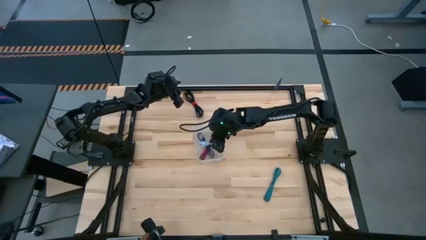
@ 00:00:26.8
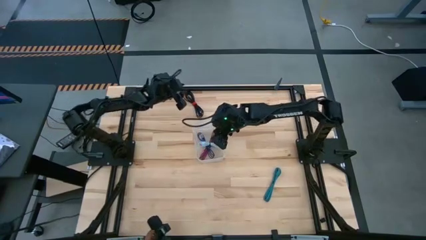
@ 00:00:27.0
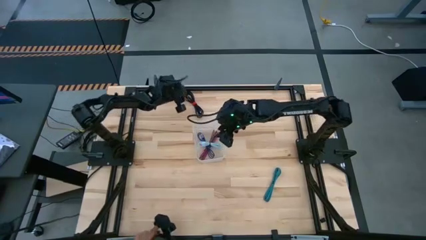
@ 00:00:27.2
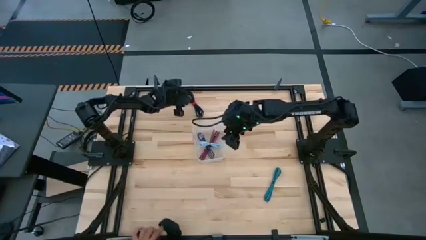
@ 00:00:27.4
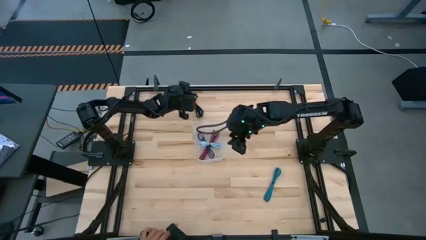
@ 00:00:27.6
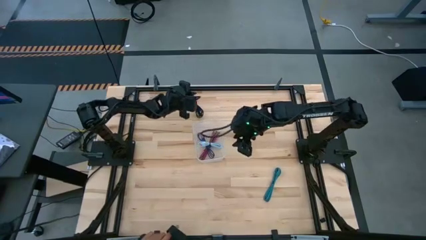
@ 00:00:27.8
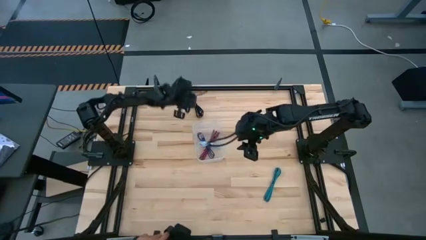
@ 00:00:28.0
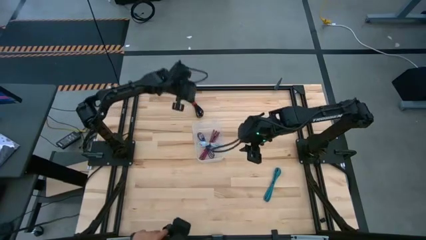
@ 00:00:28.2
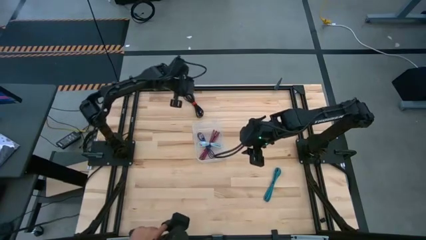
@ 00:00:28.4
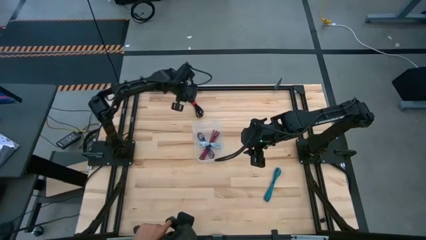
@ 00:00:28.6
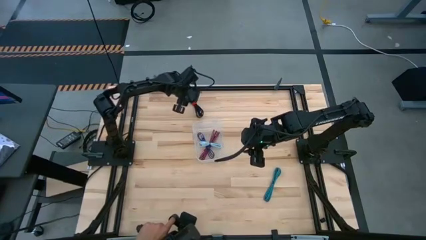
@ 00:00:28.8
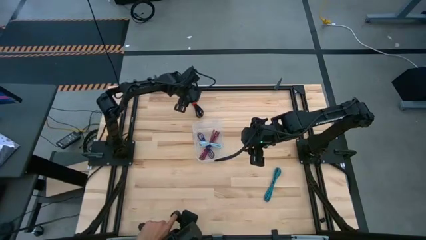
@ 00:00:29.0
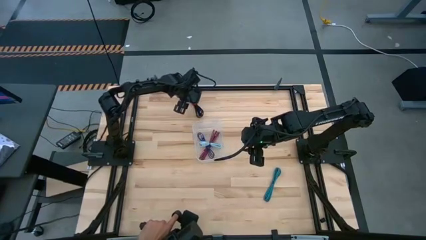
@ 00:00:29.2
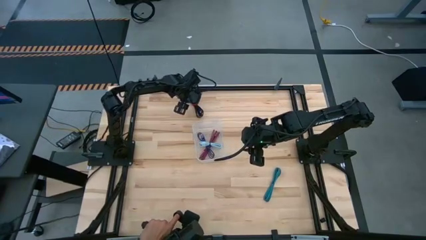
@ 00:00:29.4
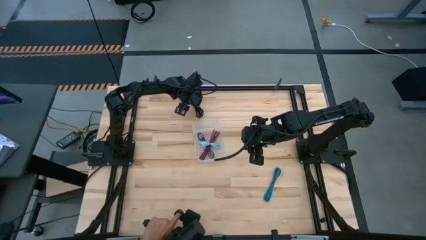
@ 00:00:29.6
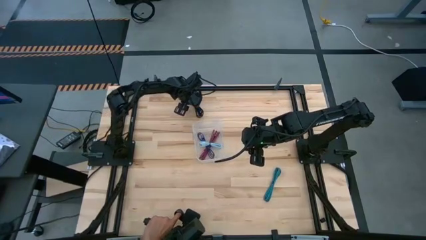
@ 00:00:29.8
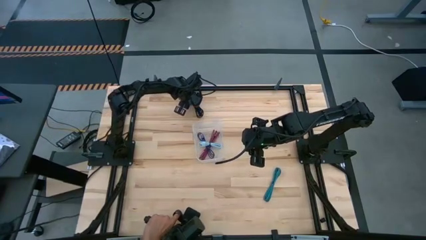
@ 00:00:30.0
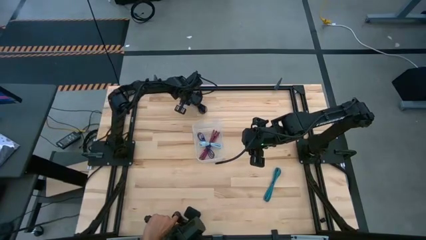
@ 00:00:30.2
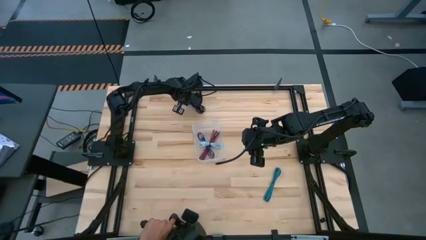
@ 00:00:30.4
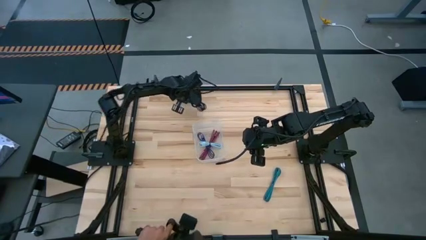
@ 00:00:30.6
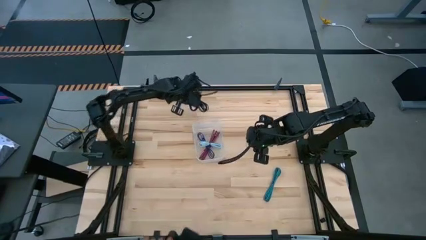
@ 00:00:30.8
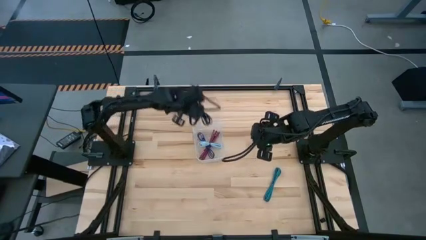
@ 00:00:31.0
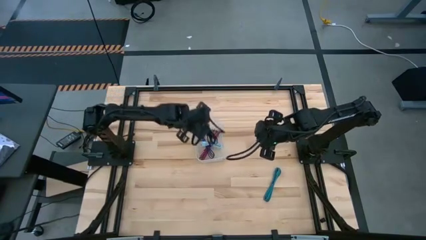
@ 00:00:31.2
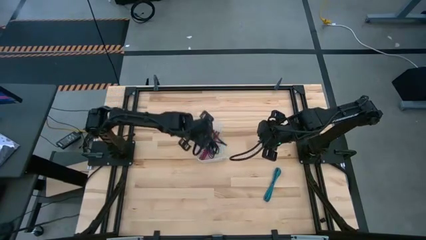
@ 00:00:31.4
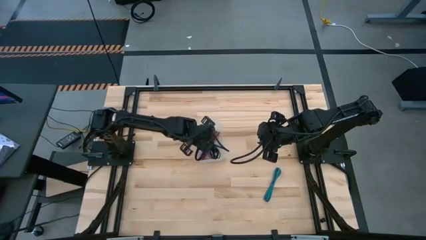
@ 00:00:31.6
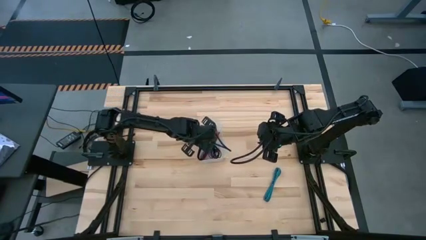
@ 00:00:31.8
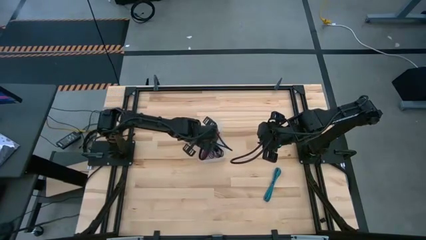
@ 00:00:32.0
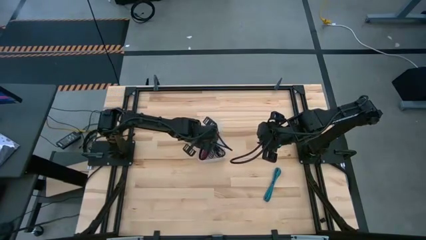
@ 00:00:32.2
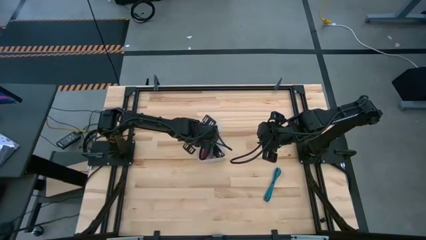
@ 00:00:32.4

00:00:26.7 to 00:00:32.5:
Task: Pick and place USB-C Cables
Put the black charger cable into the white bin

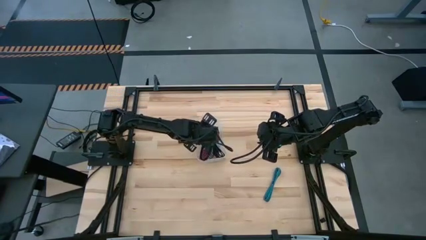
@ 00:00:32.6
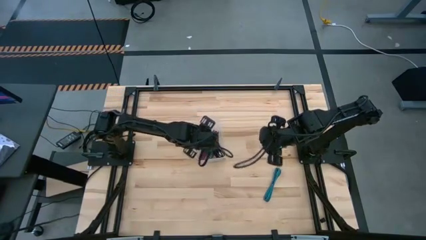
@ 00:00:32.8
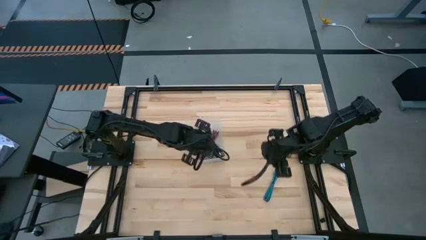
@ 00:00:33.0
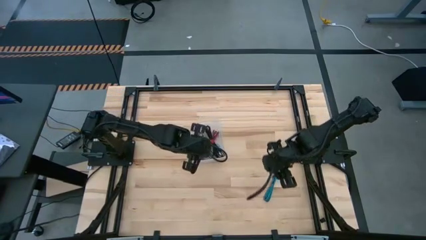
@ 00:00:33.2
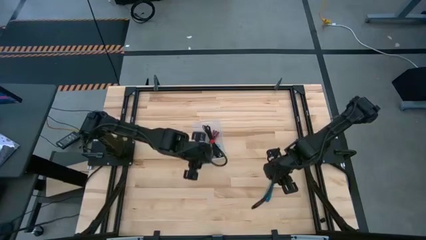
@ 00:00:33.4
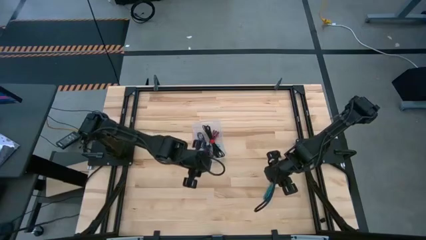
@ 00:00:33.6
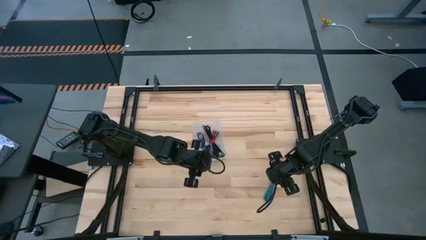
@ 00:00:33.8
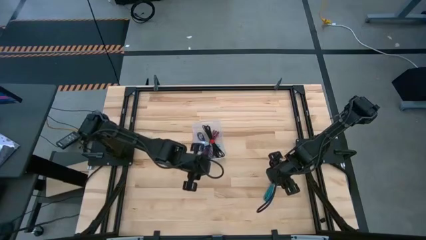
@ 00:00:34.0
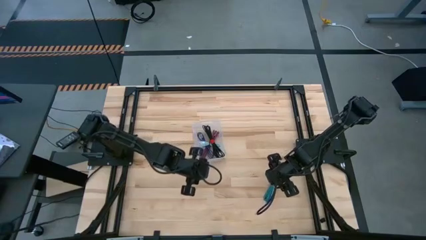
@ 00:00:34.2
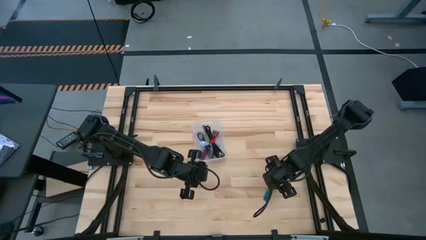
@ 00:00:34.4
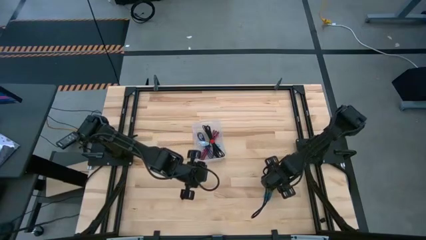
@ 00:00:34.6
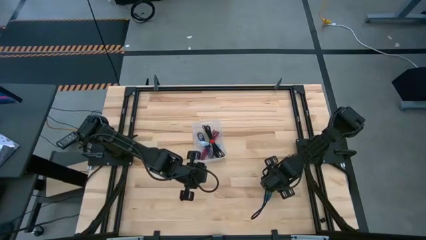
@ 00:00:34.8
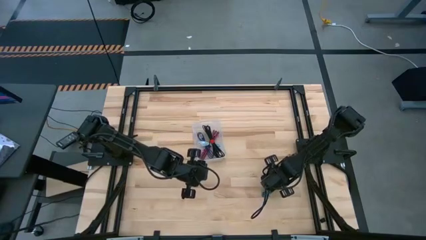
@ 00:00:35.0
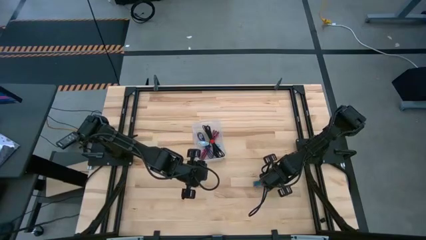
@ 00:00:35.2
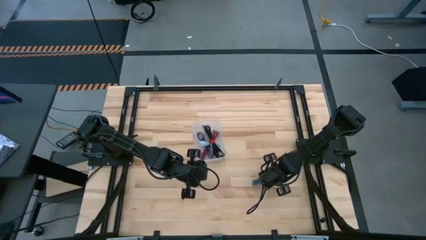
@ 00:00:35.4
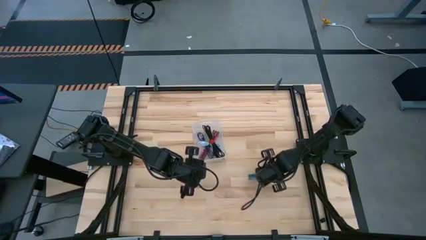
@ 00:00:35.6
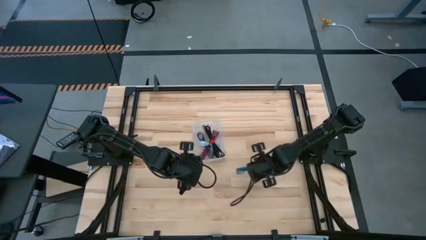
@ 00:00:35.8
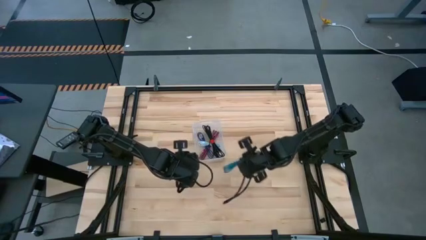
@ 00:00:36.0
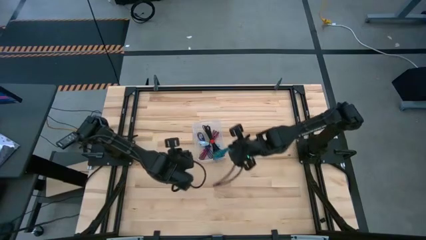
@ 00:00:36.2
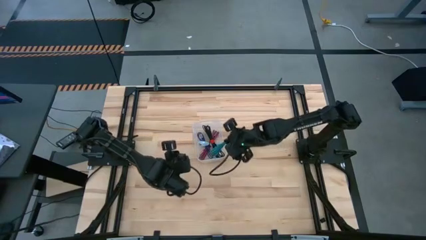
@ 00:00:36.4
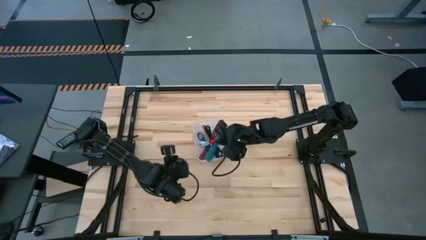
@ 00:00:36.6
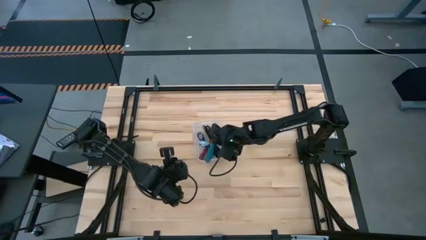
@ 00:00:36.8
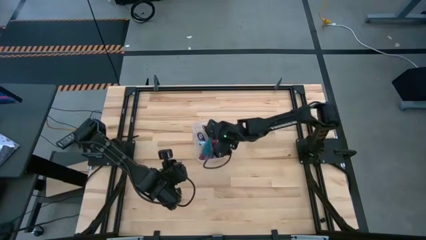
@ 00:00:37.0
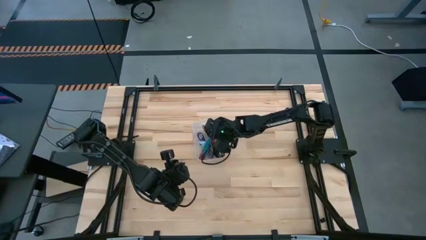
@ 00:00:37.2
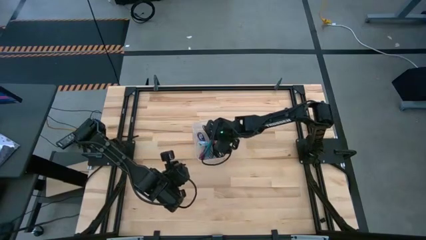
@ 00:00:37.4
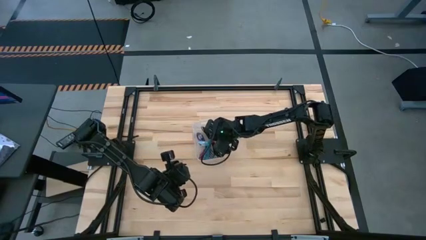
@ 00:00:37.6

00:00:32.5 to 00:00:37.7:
Put the blue charger cable into the white bin

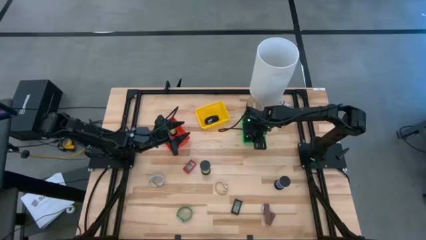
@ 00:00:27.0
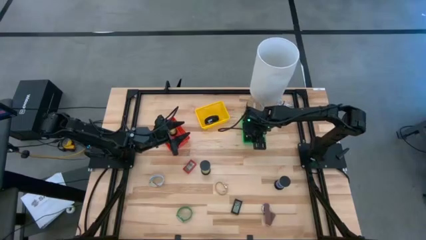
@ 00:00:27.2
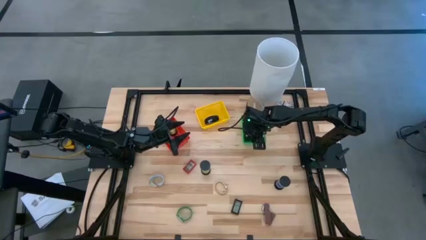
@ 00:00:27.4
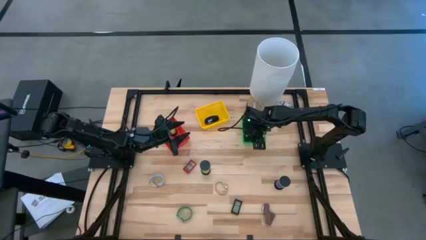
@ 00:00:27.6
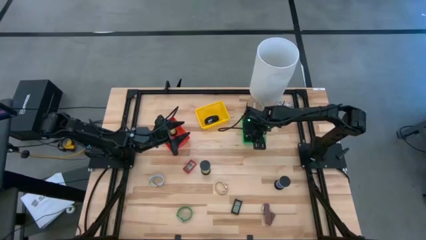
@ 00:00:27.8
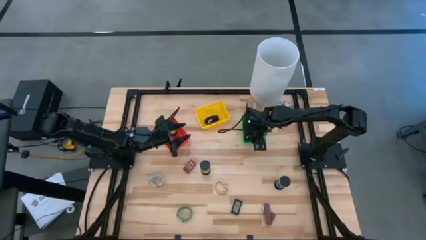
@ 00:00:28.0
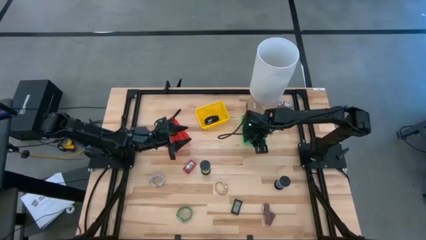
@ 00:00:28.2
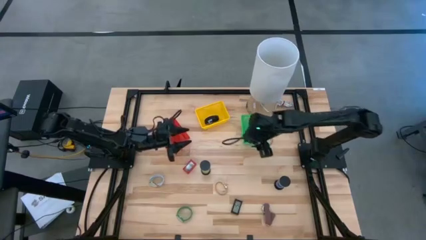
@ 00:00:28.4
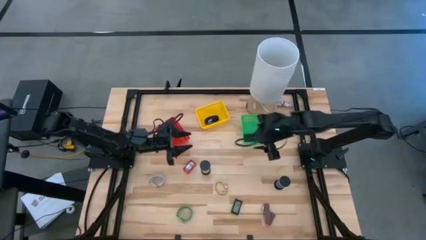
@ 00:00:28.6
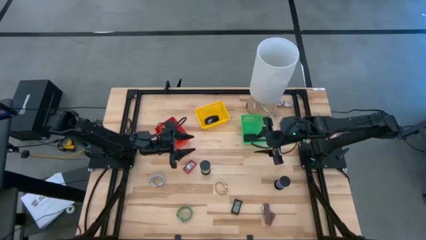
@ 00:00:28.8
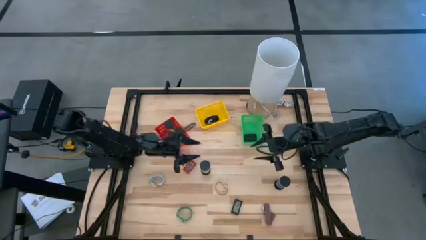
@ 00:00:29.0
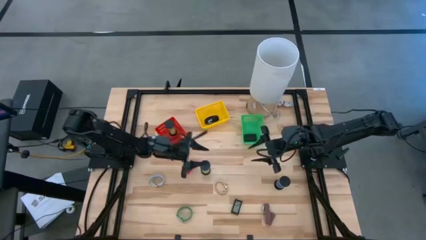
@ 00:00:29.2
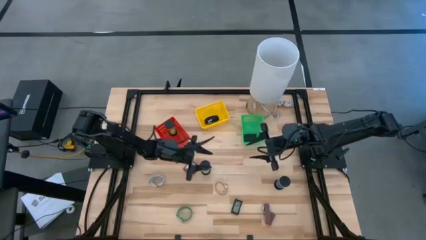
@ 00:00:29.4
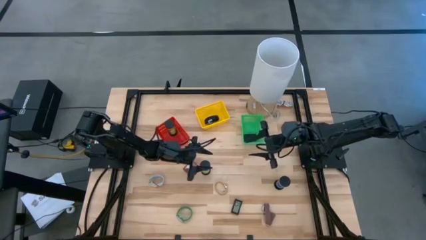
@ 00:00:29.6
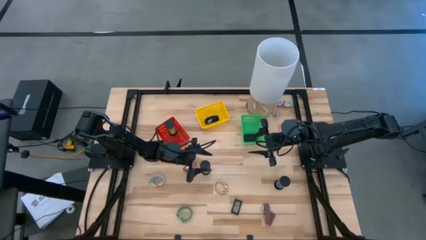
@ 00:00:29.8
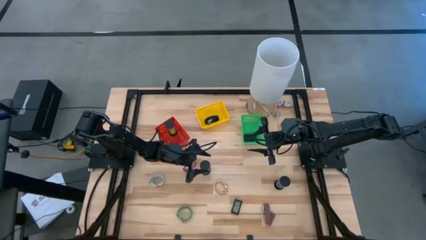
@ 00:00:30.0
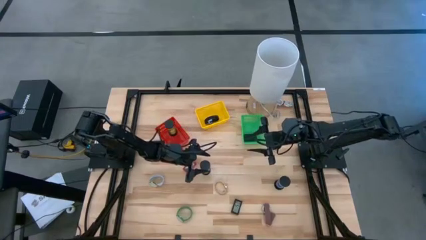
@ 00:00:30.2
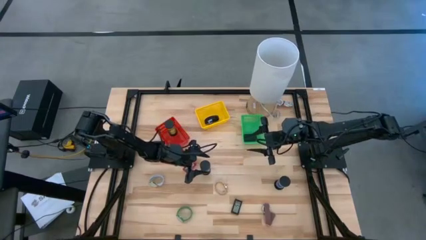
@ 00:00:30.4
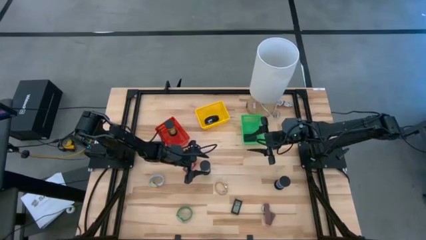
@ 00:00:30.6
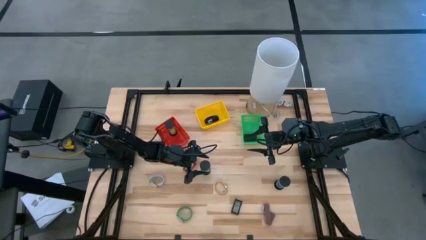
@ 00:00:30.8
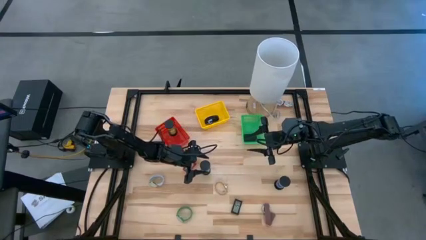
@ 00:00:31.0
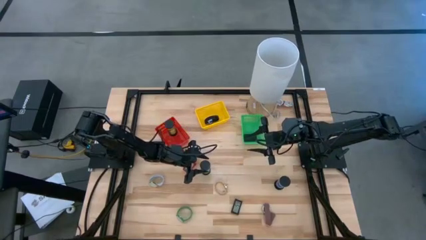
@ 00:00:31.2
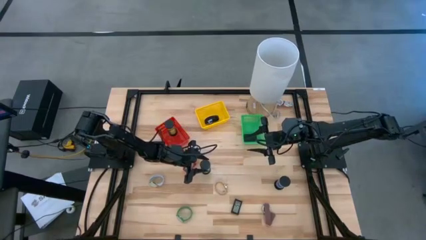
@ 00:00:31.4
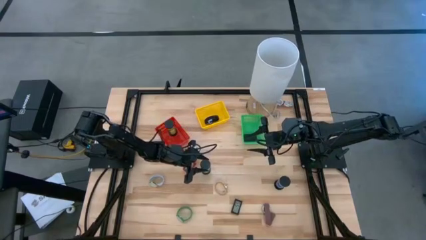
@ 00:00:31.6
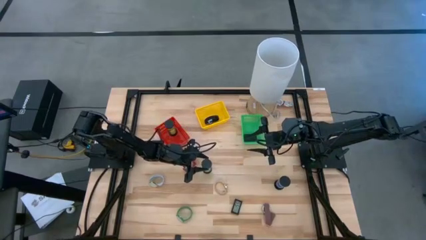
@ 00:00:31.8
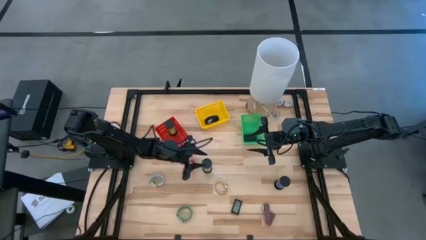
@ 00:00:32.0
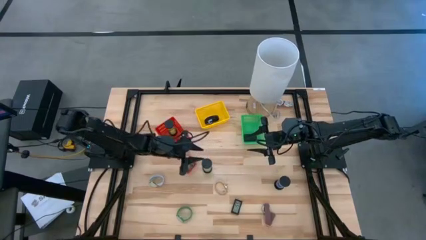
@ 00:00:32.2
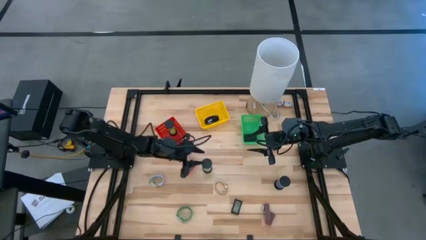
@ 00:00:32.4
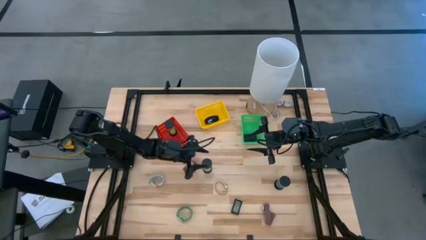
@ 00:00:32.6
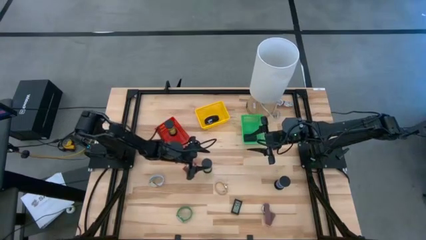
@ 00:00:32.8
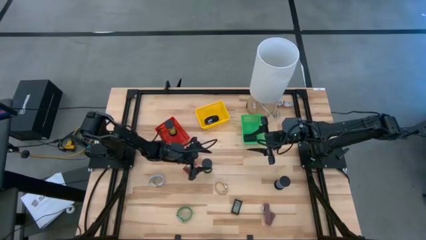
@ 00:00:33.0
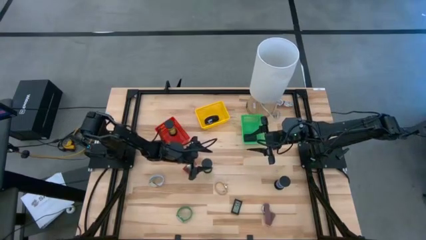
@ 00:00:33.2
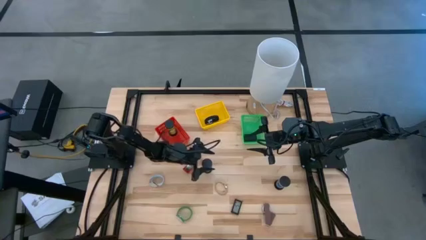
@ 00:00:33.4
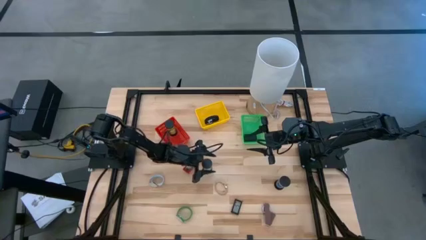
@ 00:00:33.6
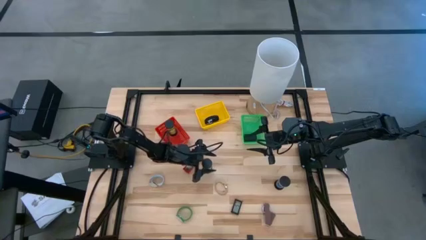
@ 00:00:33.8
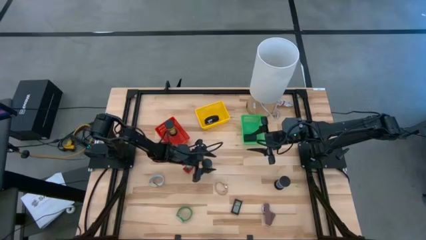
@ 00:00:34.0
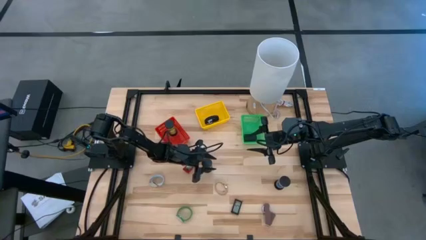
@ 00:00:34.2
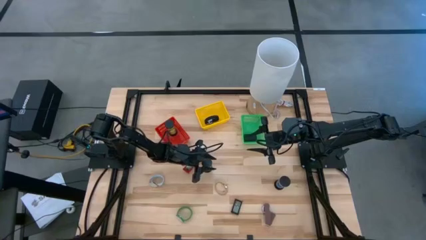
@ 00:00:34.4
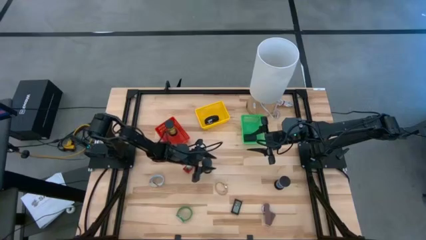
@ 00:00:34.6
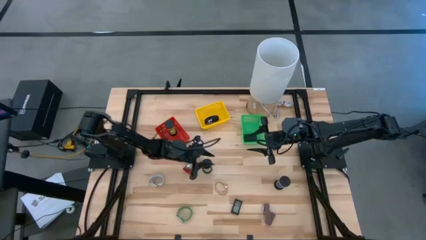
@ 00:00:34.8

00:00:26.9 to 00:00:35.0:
Task: Pick & Place Office items
Put the left green hourglass into the red basket
